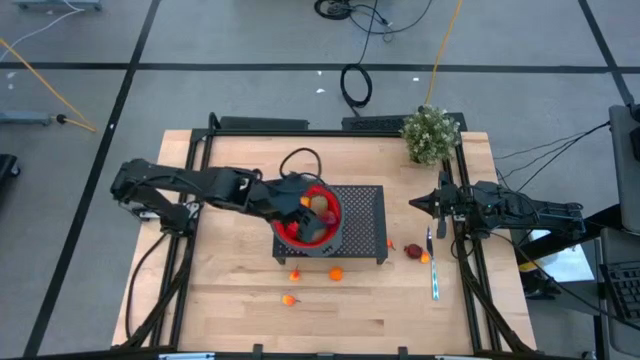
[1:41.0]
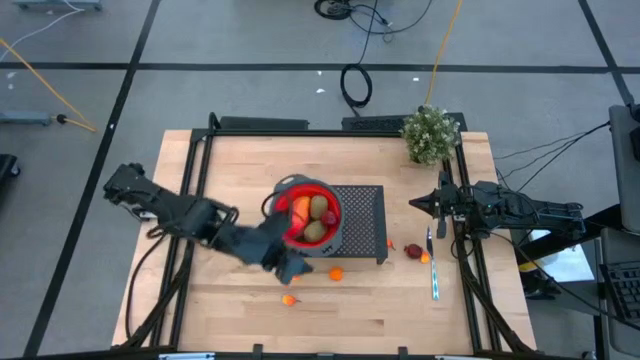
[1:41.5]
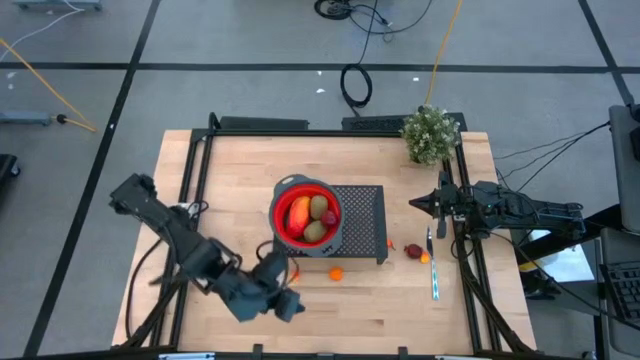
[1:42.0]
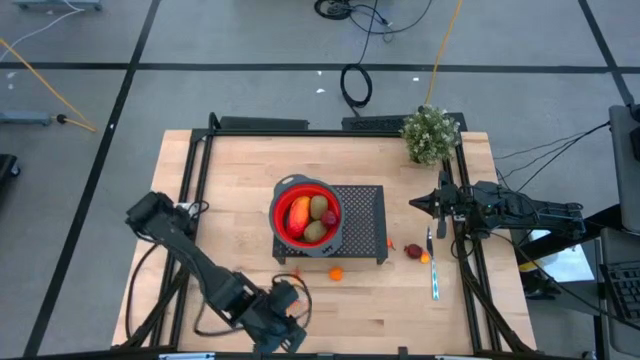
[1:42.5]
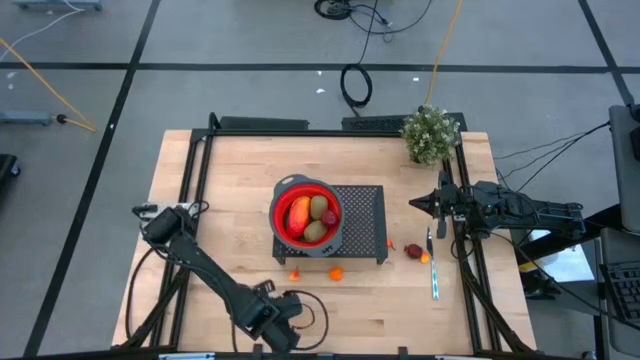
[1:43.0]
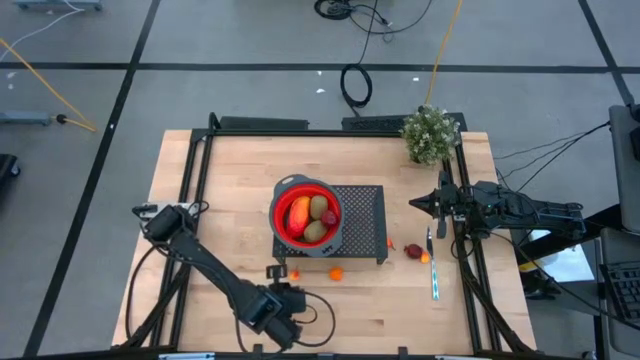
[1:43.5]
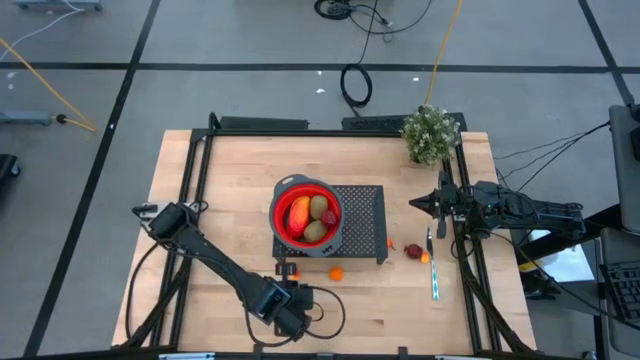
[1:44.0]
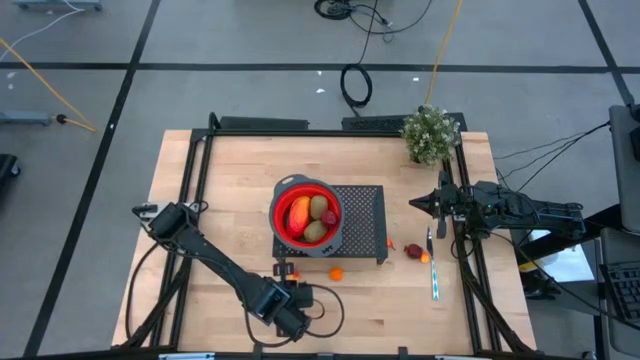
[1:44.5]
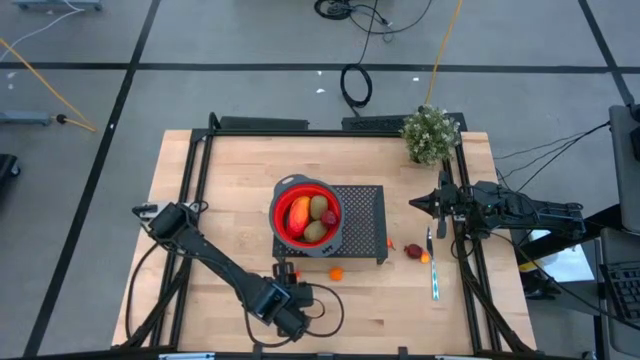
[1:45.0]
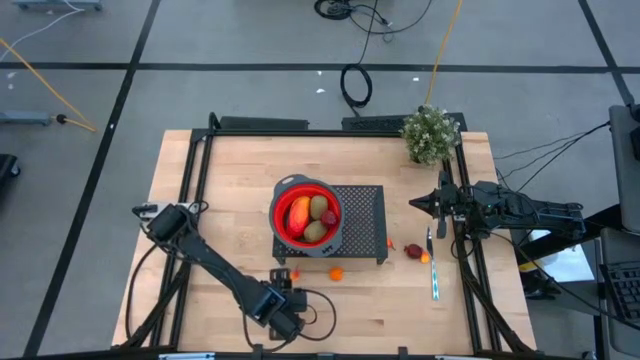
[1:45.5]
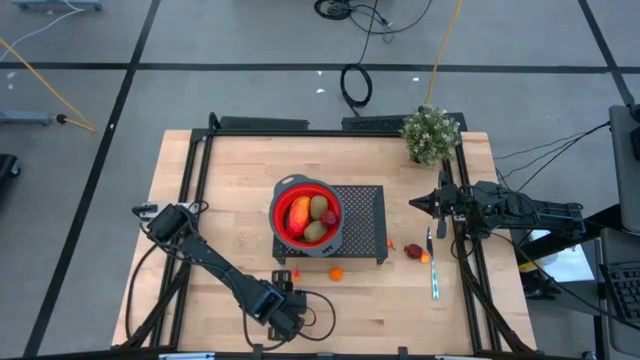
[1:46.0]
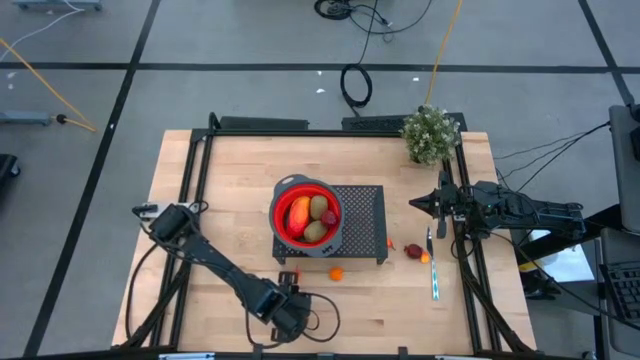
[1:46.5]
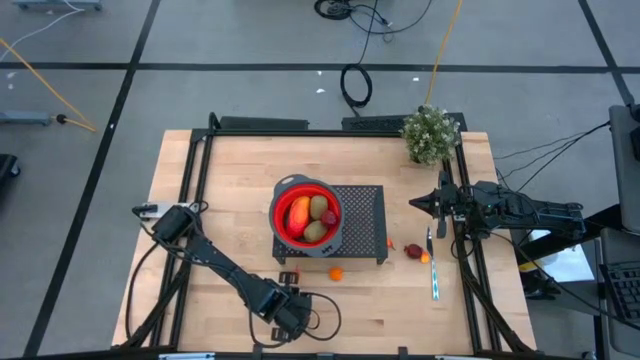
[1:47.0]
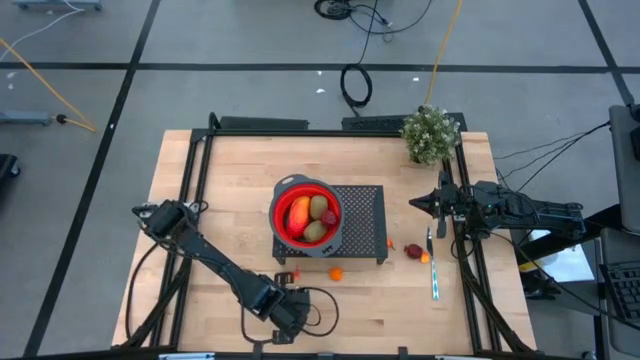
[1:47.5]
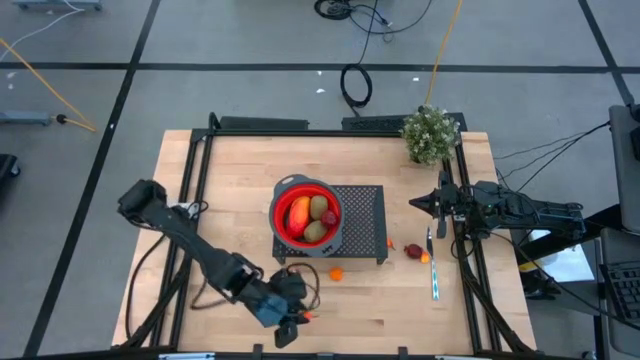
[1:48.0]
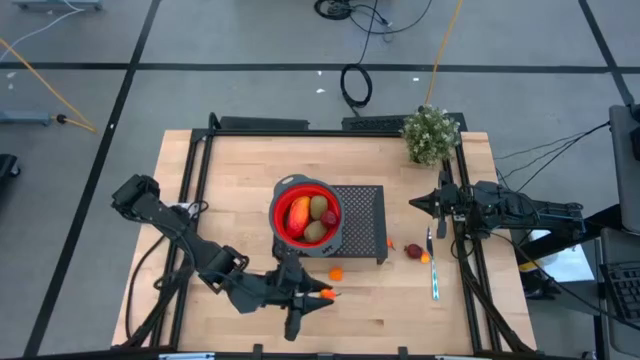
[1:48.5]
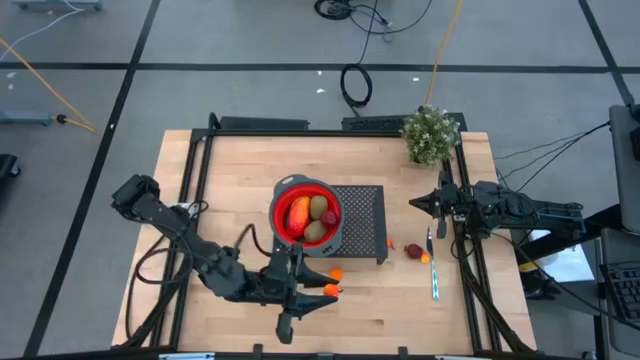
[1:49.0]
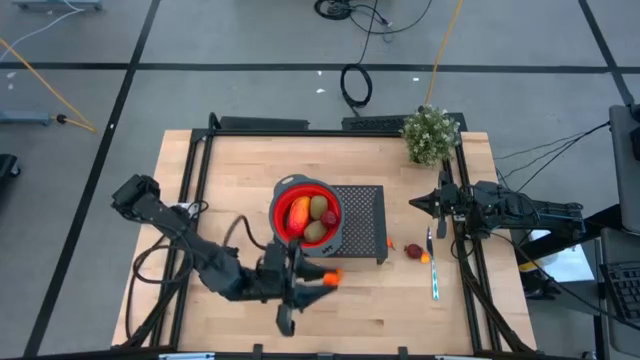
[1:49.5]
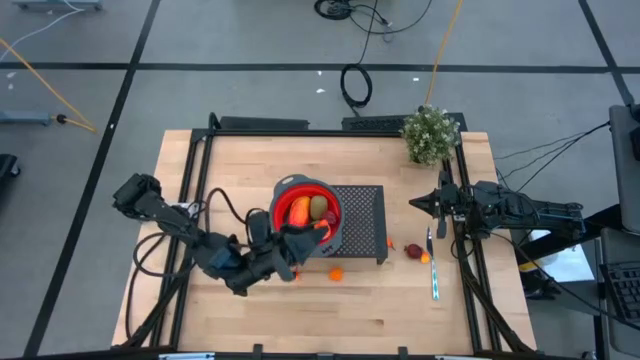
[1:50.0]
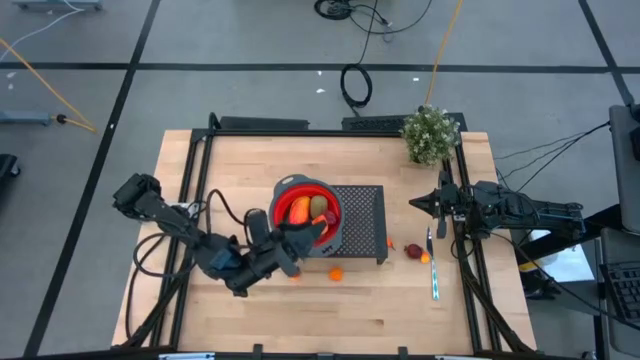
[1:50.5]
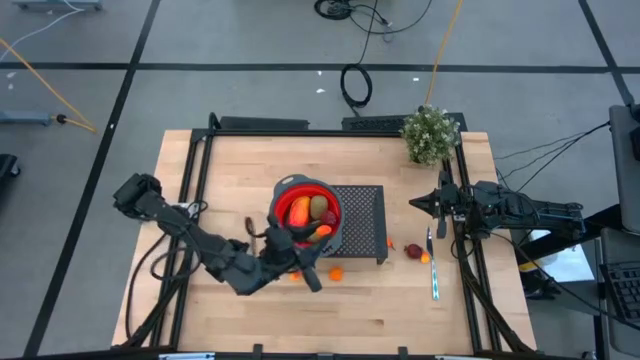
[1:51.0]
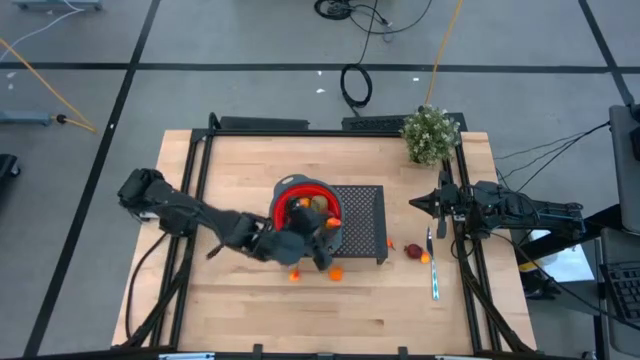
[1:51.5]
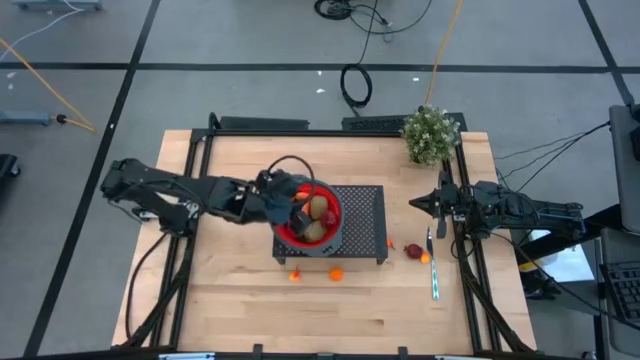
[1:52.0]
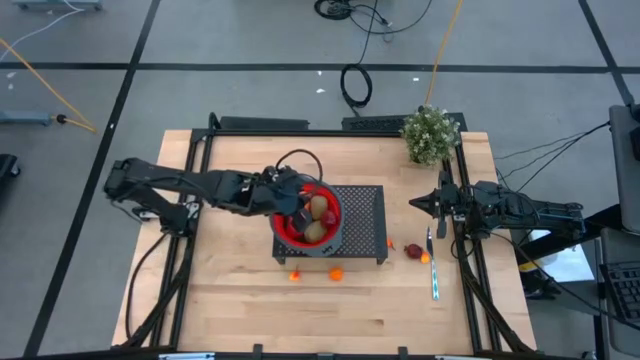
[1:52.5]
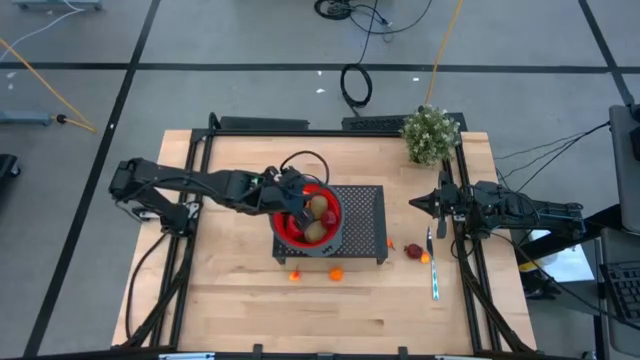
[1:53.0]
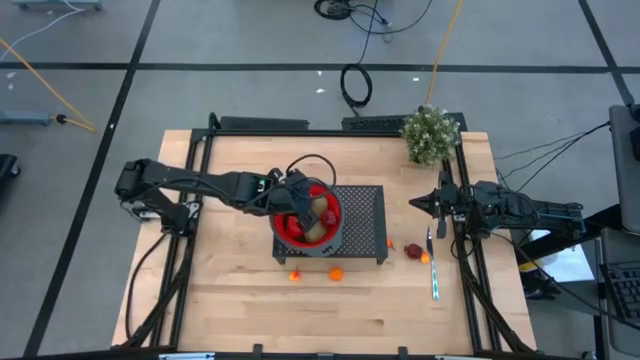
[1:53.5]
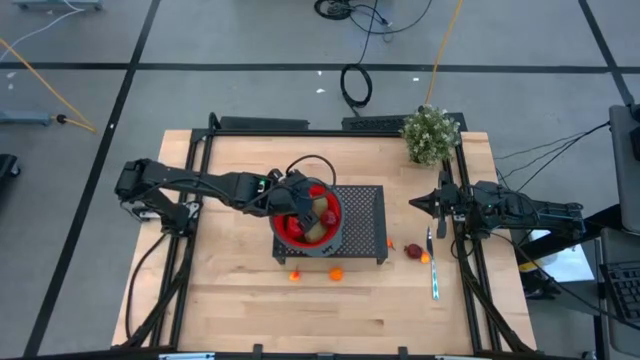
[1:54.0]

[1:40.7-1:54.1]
Task: Pick & Place Fruit
Put the peach into the red colander on the shelf

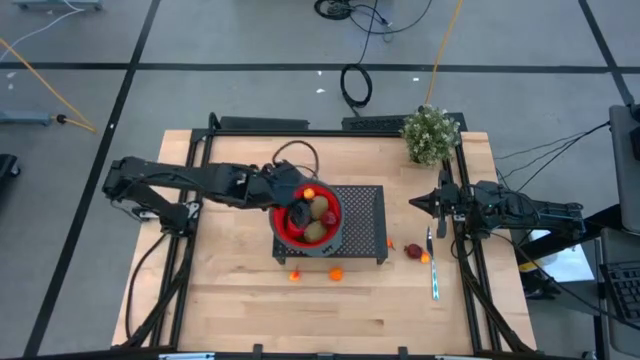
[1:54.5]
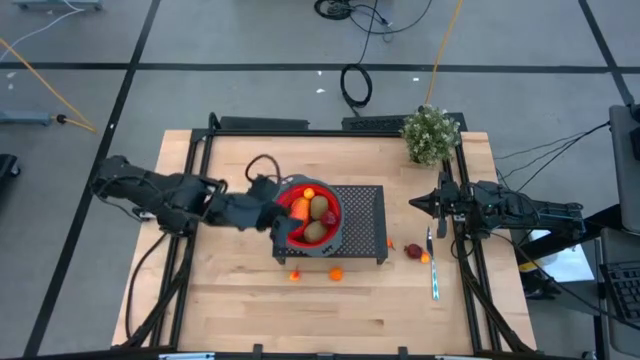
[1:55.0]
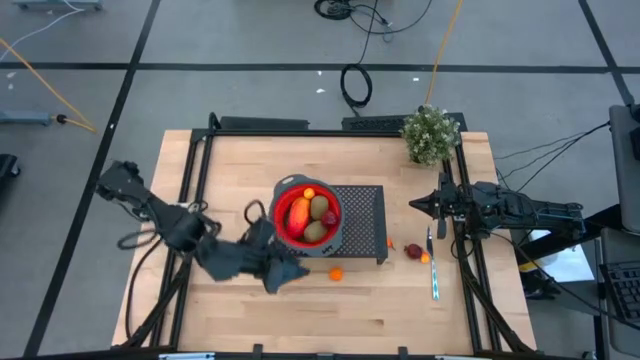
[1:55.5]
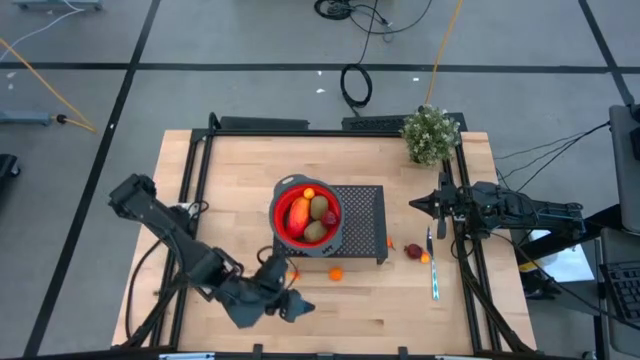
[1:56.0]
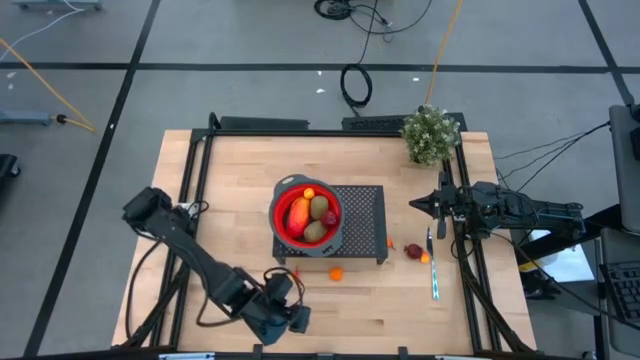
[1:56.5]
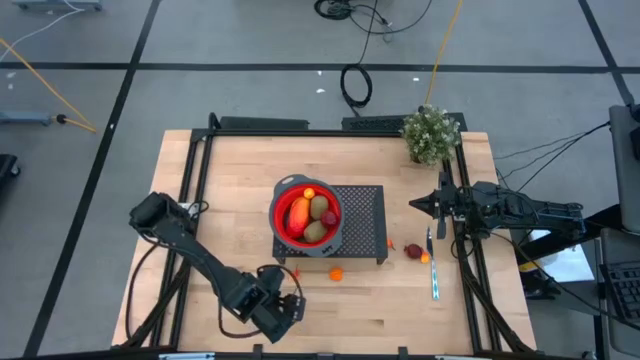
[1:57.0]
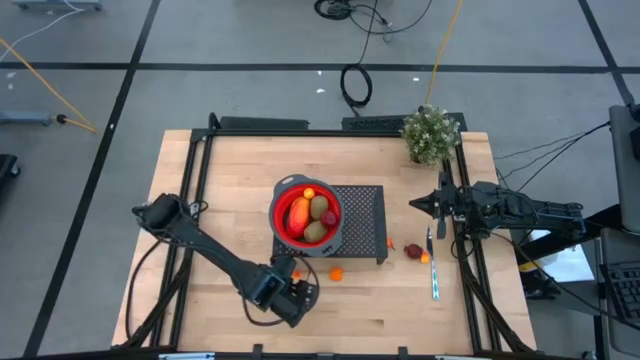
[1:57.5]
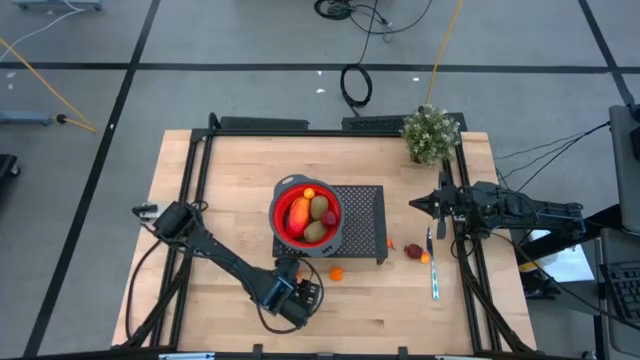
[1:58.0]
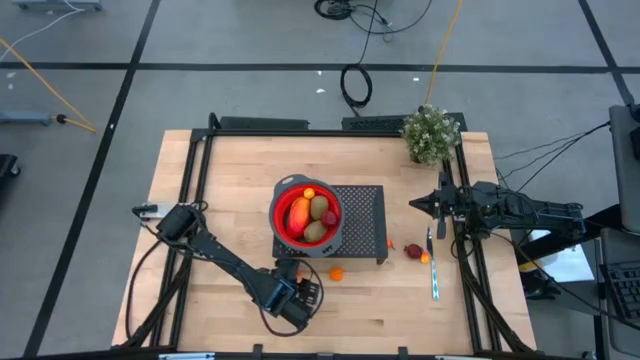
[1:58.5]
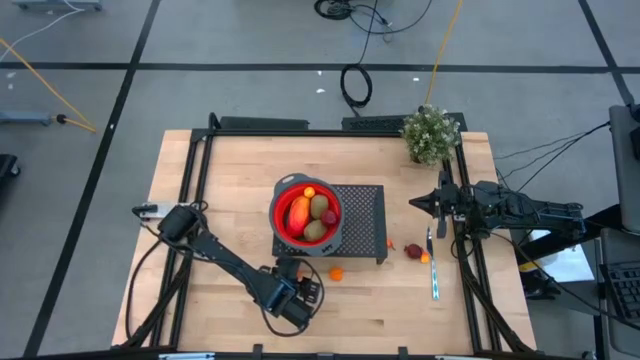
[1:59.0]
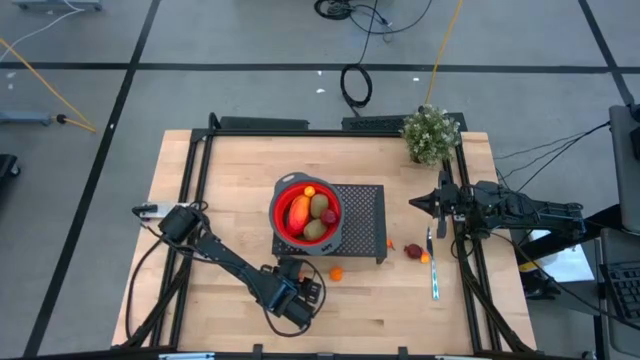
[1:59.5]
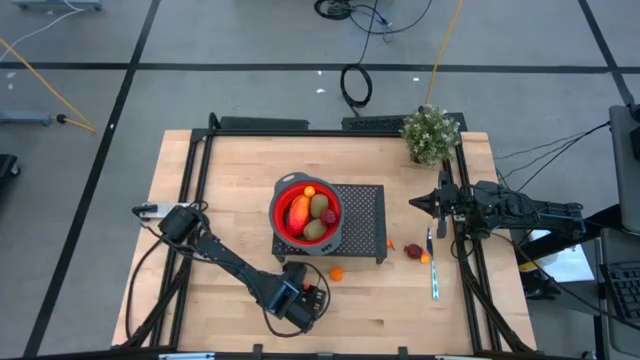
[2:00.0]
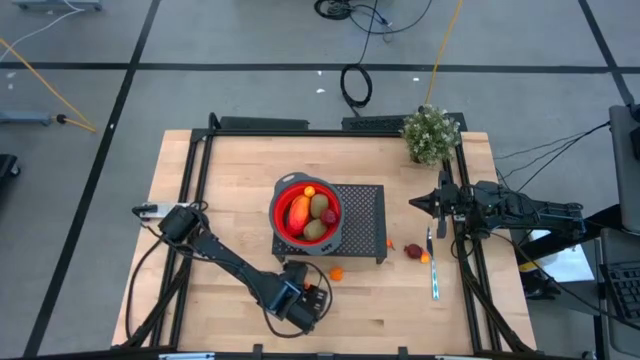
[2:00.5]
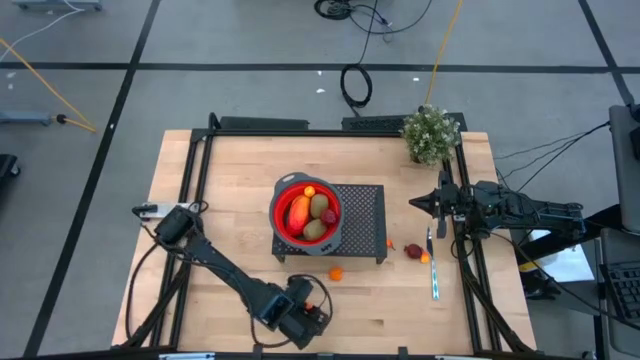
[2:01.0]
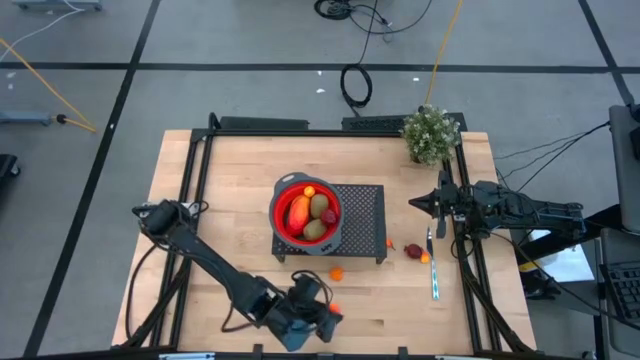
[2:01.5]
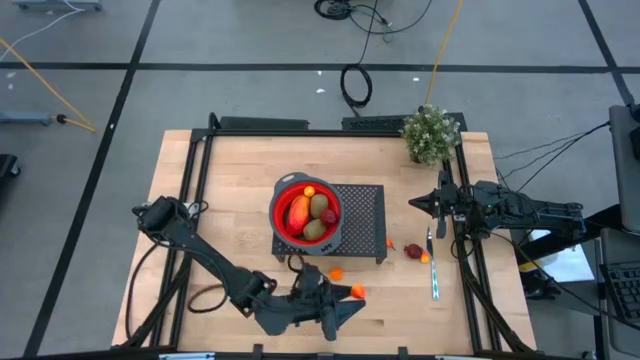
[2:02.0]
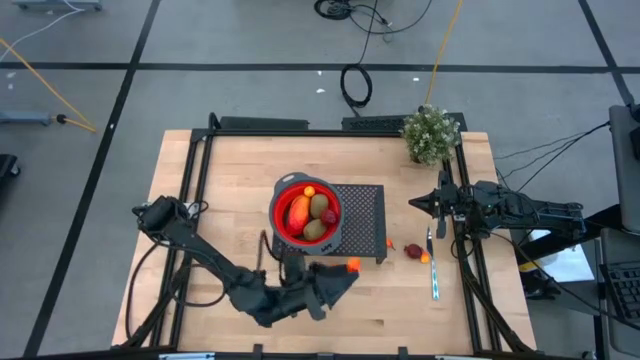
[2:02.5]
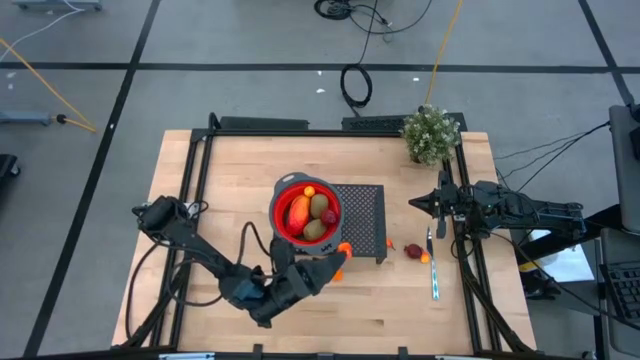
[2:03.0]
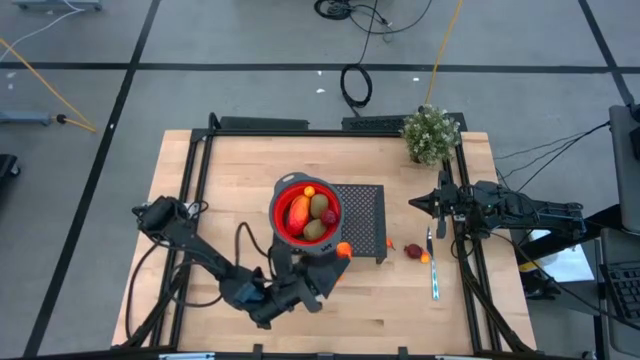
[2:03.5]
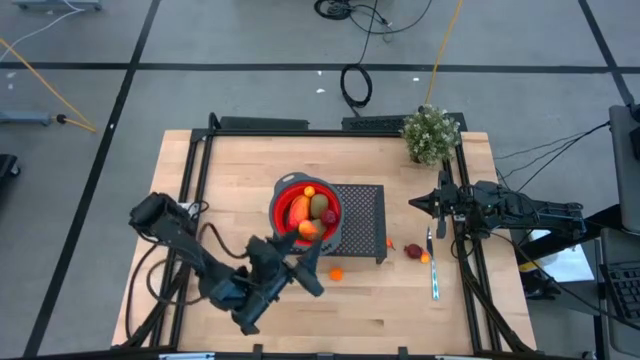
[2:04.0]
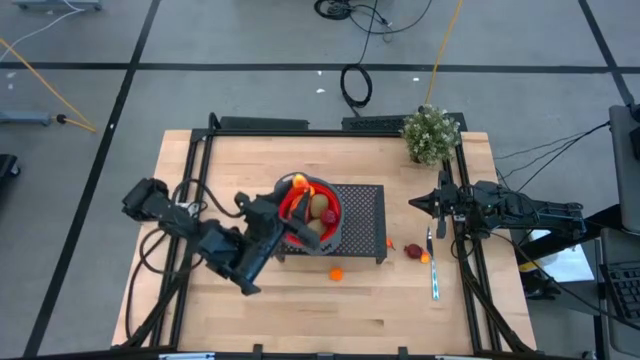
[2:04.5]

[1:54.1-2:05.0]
Put the peach into the red colander on the shelf
